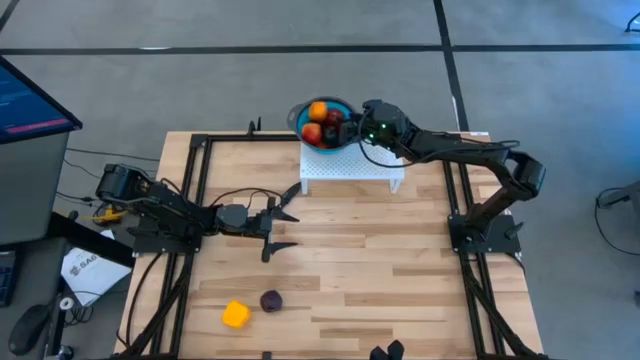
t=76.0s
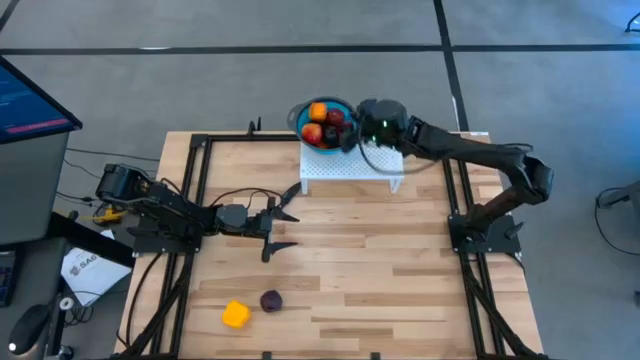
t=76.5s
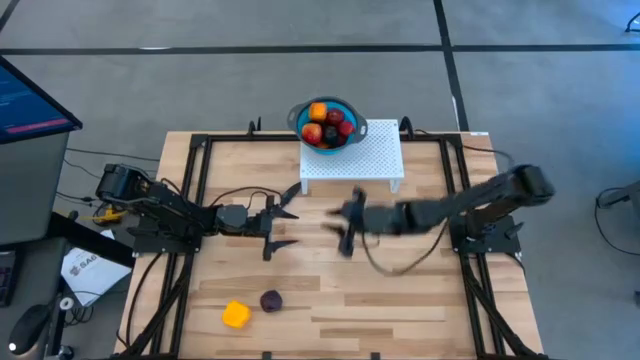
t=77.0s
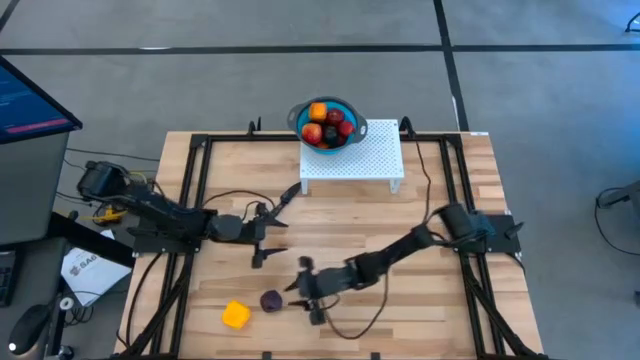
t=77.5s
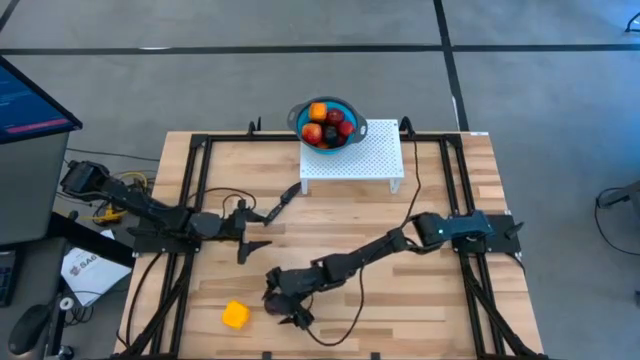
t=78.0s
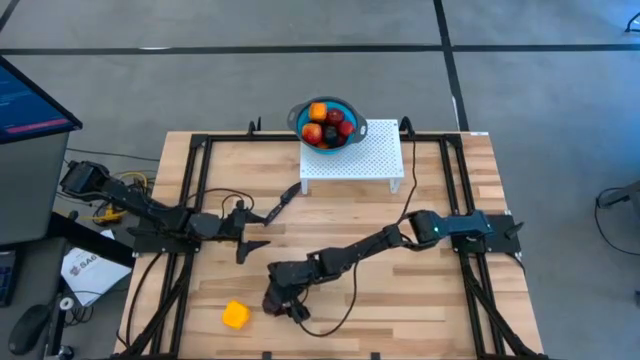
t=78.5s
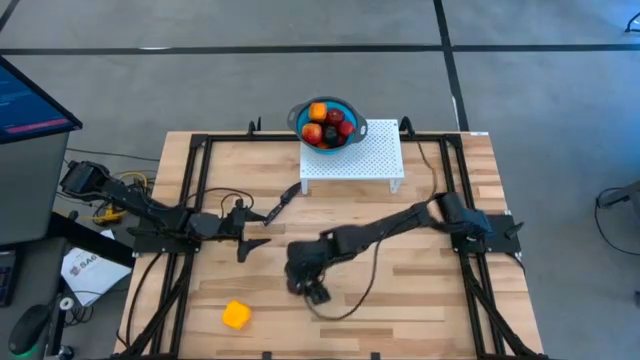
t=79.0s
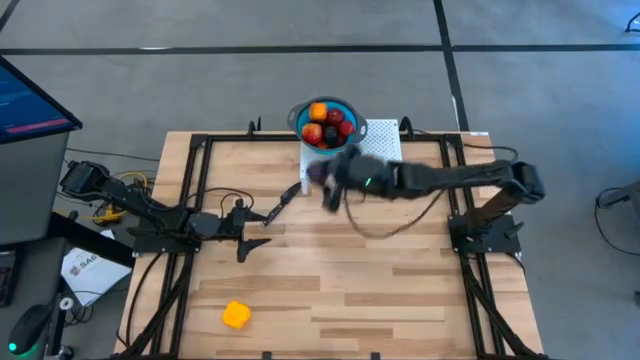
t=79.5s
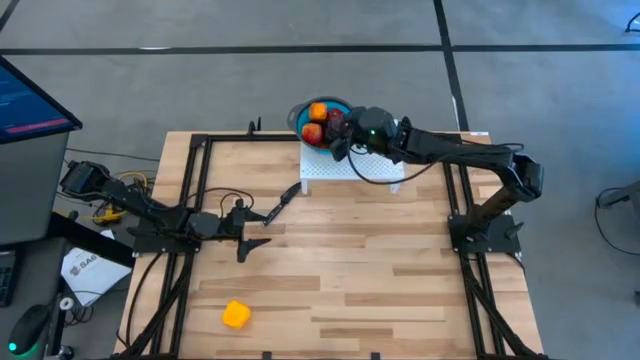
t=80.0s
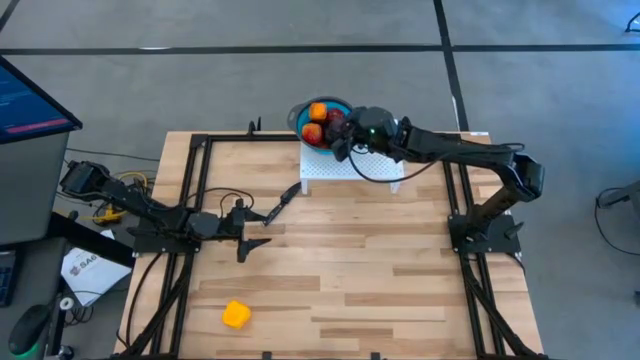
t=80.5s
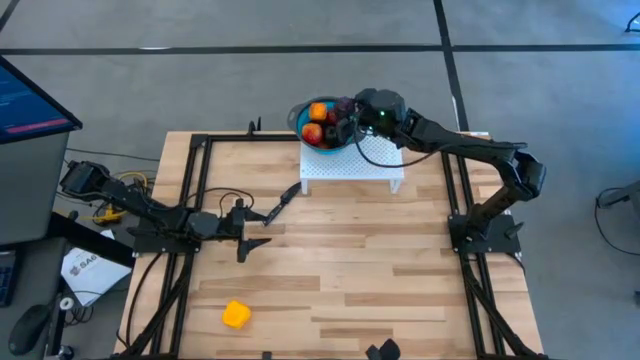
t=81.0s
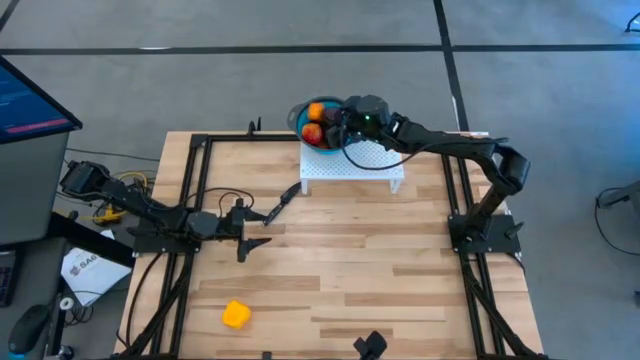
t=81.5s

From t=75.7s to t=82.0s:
Task: Pick & Place Fruit
Put the violet plum into the blue strainer bowl on the shelf

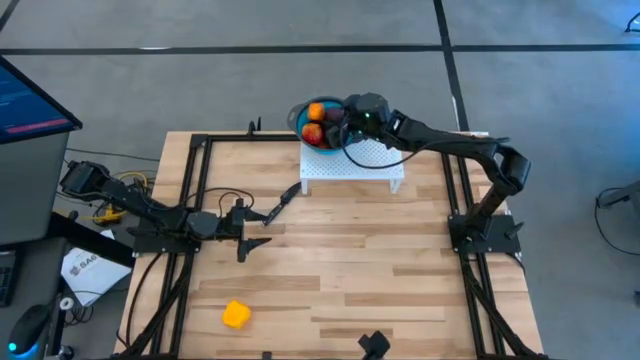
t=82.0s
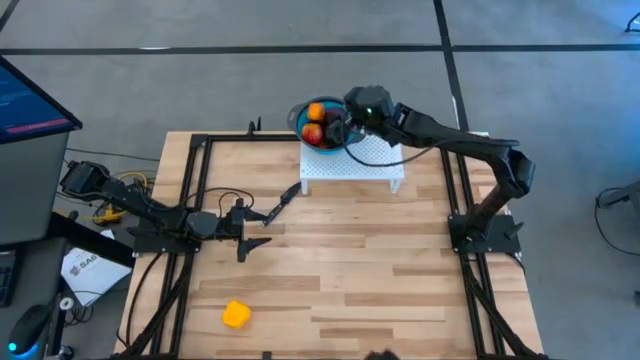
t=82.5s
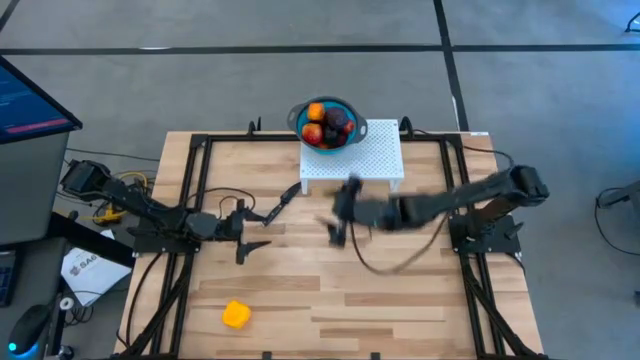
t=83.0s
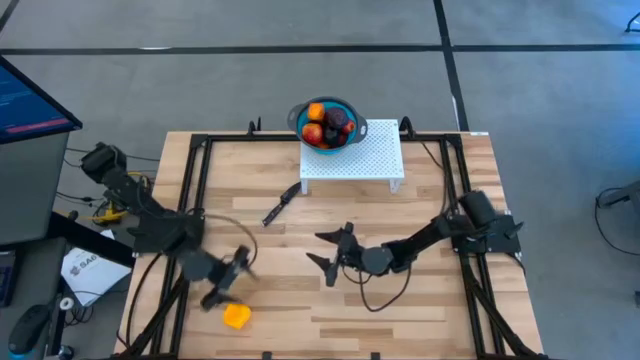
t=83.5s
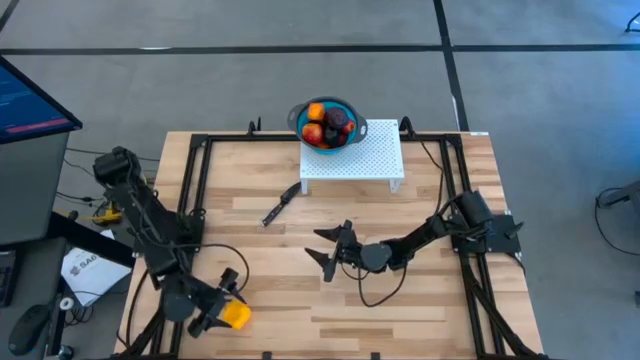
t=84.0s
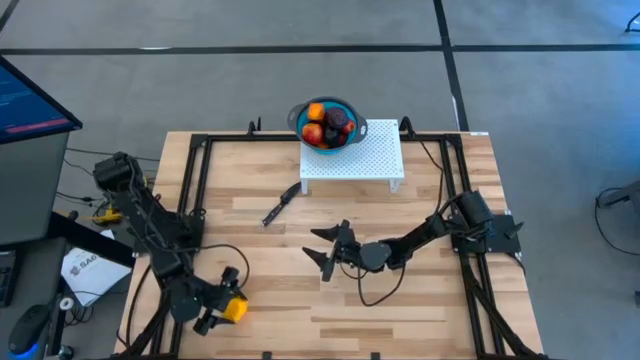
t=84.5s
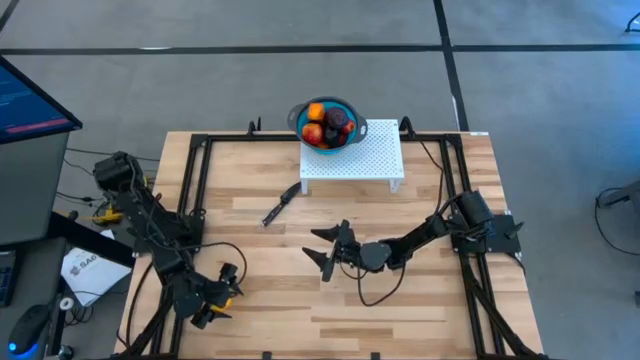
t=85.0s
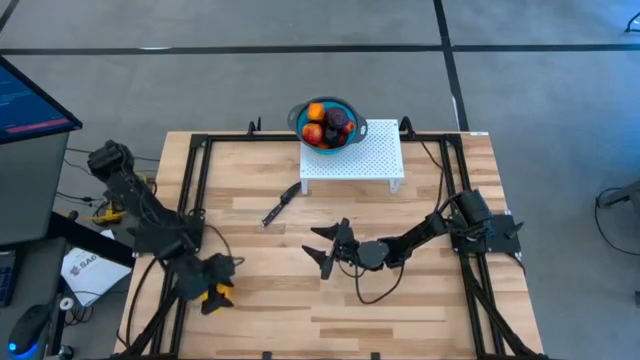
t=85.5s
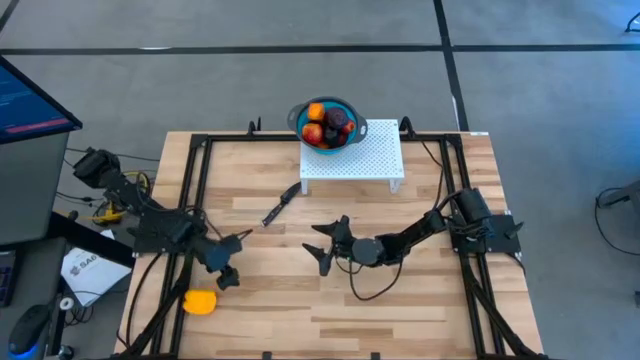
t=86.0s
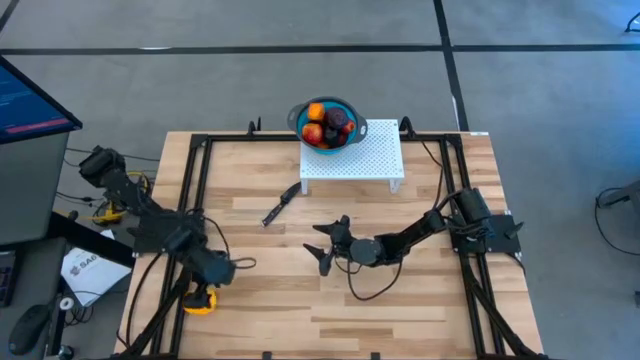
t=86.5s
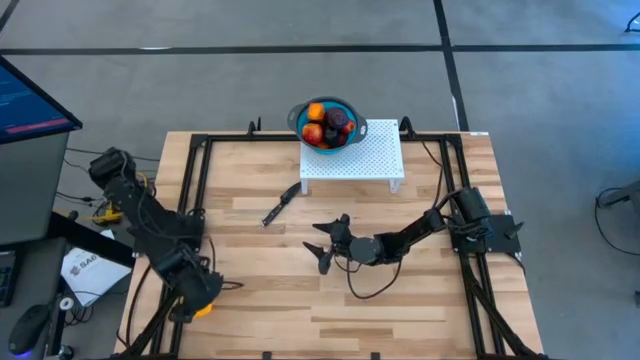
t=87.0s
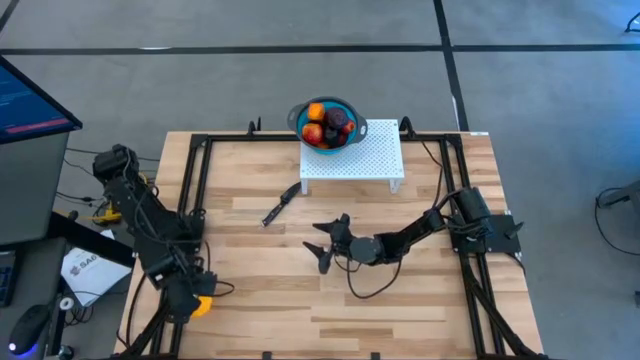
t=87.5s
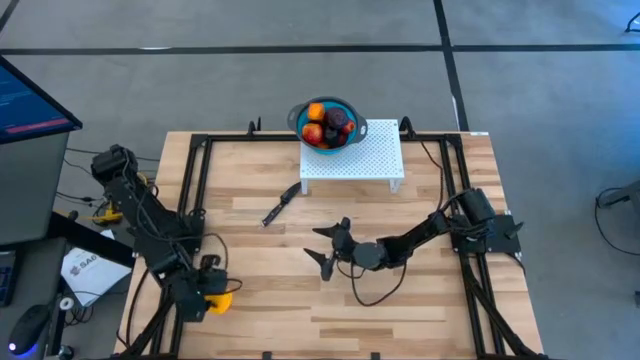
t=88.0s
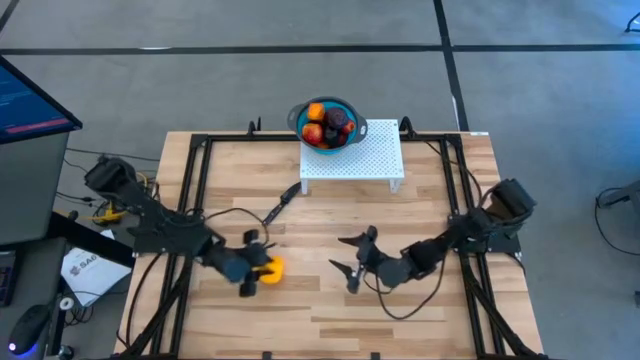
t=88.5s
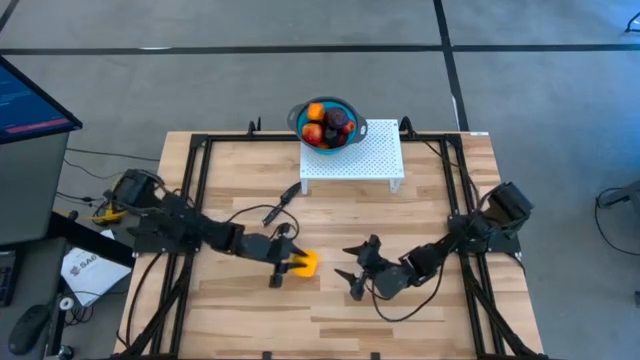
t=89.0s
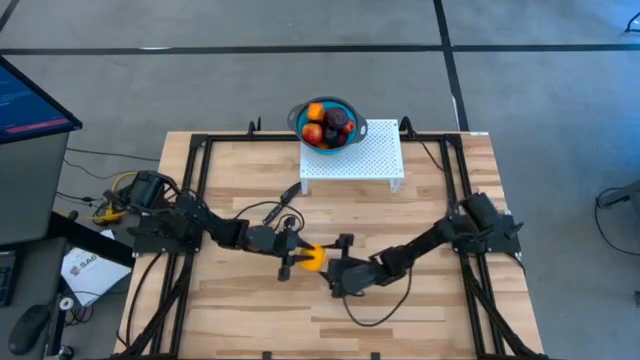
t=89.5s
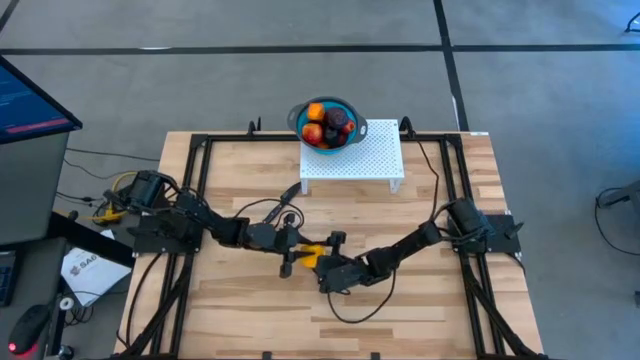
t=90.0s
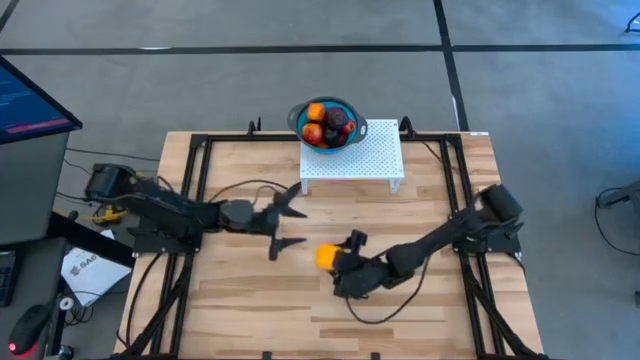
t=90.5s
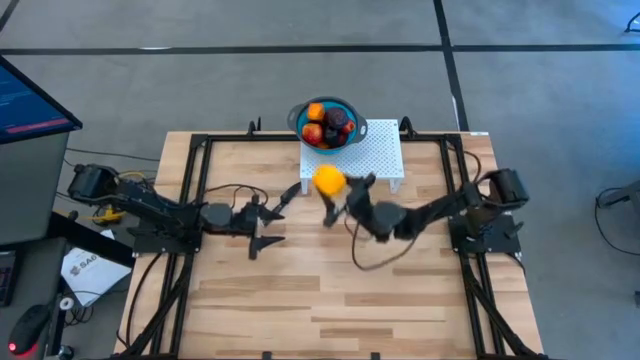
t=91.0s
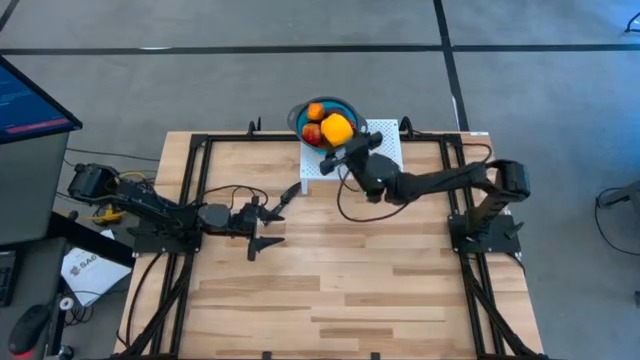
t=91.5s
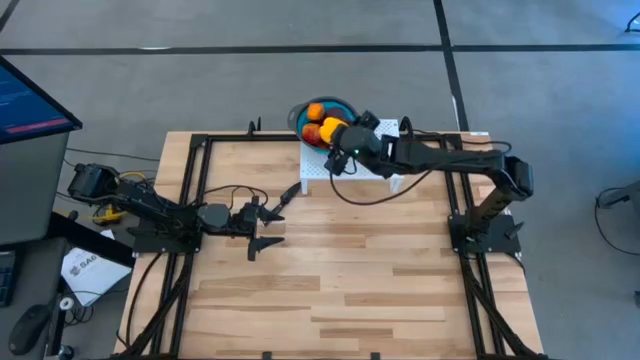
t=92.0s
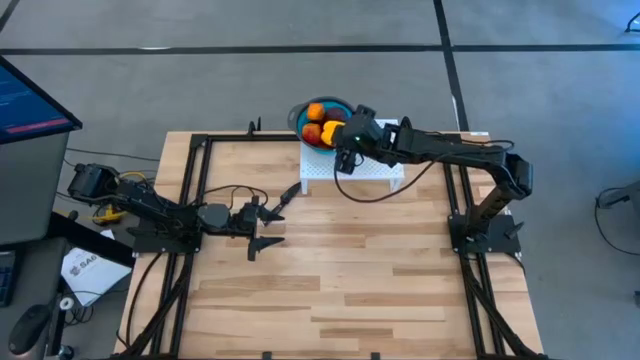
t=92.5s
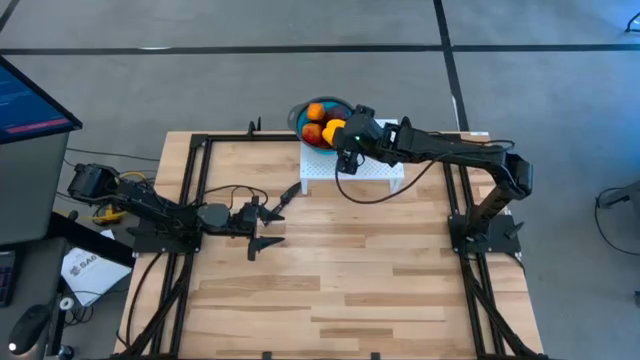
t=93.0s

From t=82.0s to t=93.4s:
Put the yellow bell pepper into the blue strainer bowl on the shelf

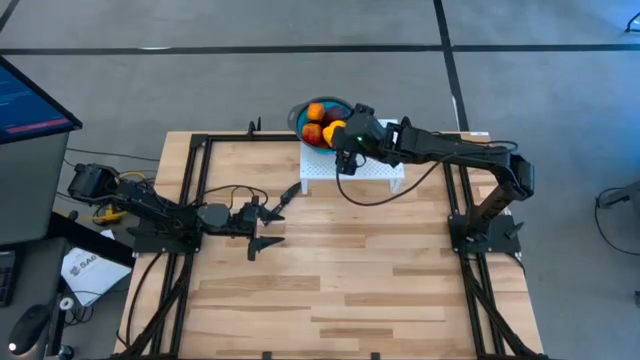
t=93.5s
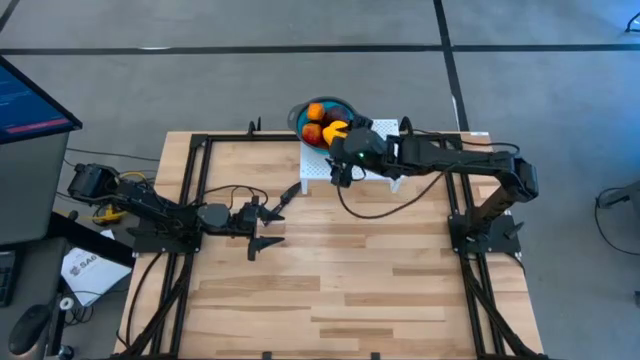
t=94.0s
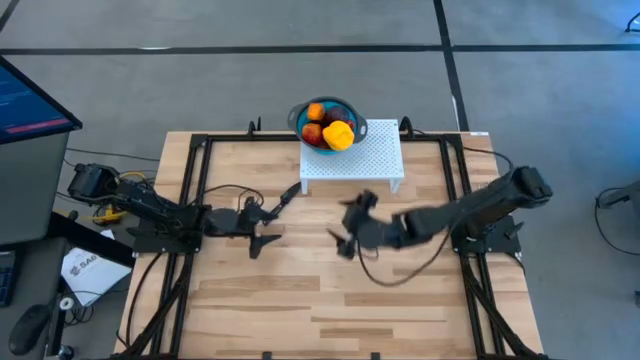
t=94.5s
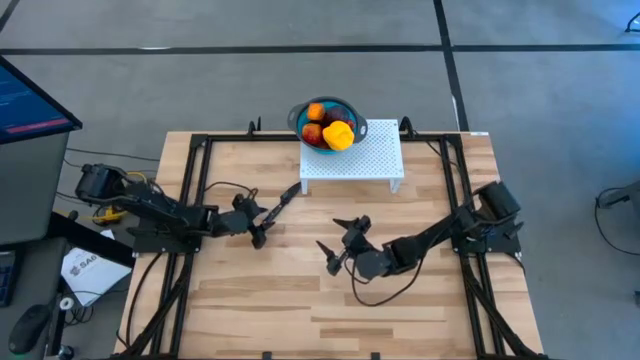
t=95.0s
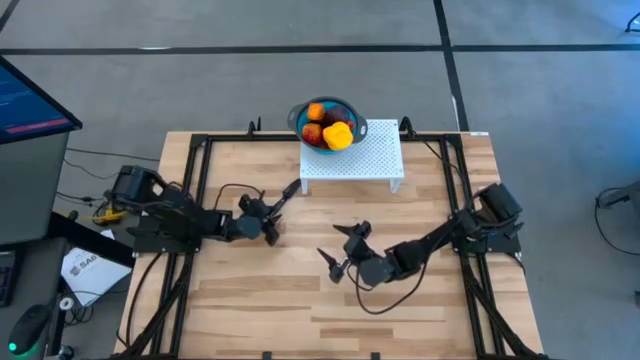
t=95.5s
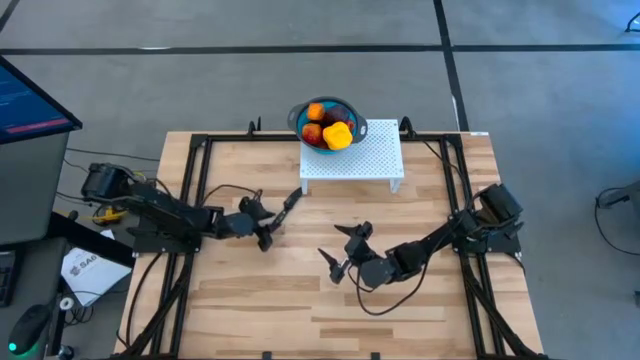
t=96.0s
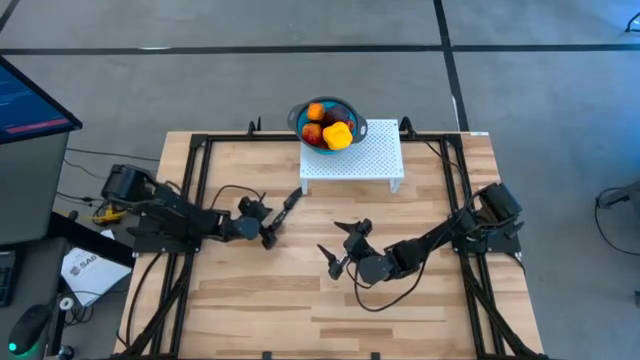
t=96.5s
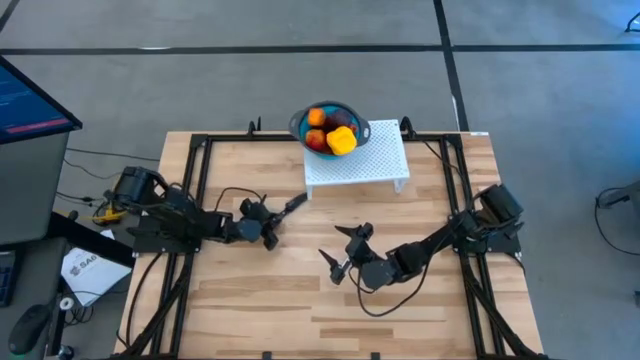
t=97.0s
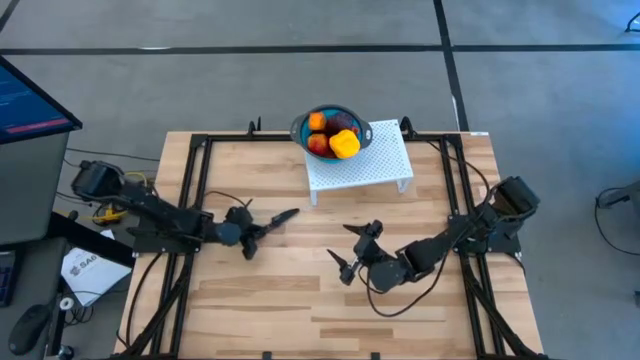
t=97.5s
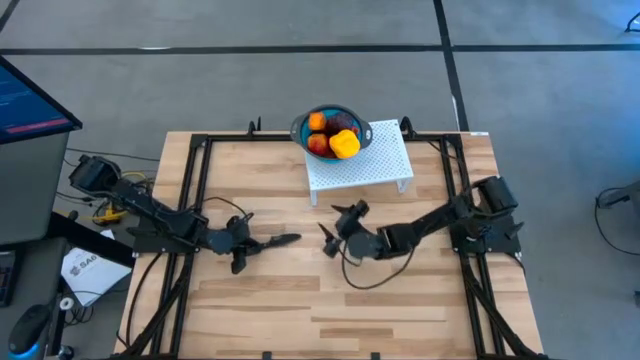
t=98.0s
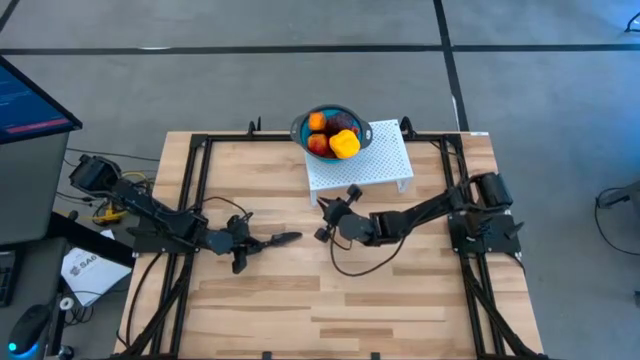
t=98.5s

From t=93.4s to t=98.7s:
Adjust the black knife
